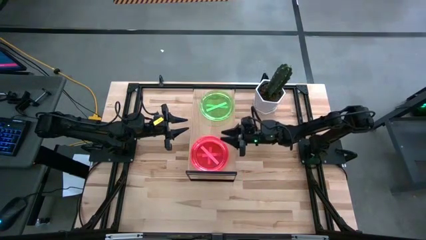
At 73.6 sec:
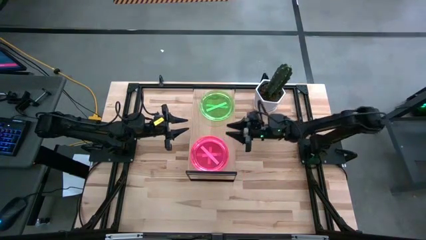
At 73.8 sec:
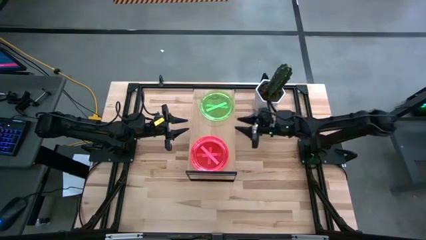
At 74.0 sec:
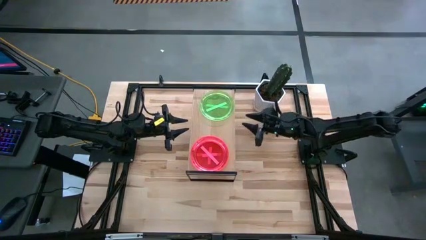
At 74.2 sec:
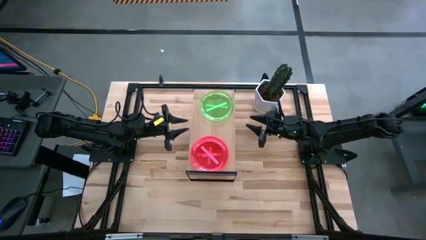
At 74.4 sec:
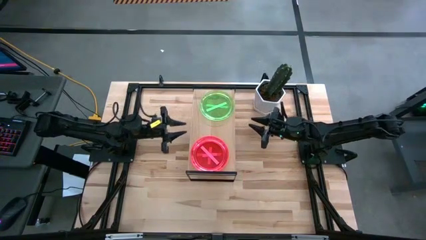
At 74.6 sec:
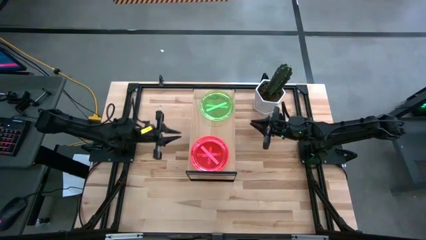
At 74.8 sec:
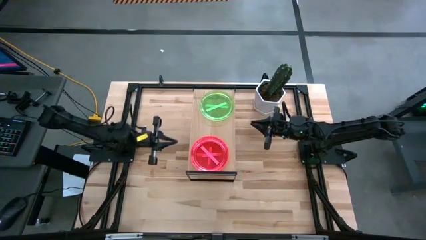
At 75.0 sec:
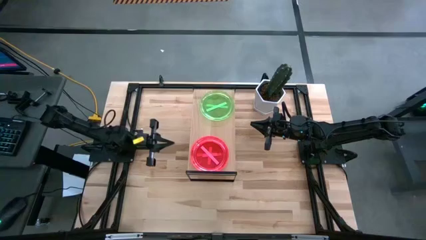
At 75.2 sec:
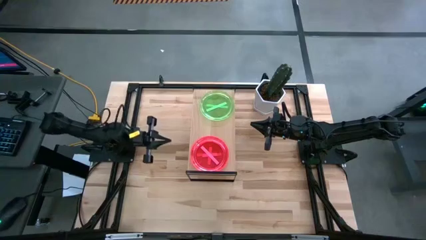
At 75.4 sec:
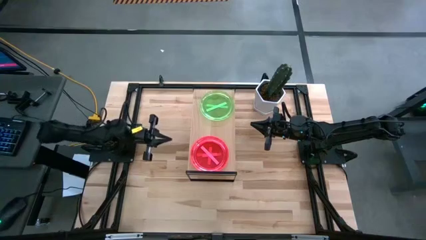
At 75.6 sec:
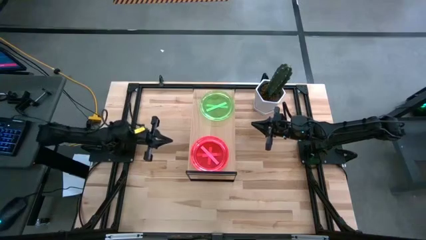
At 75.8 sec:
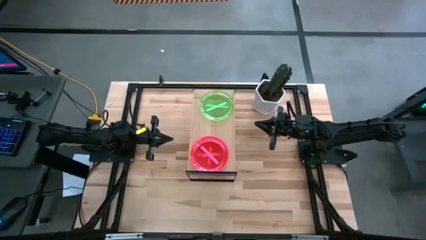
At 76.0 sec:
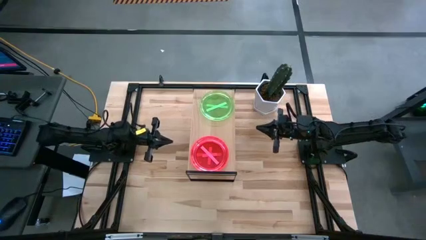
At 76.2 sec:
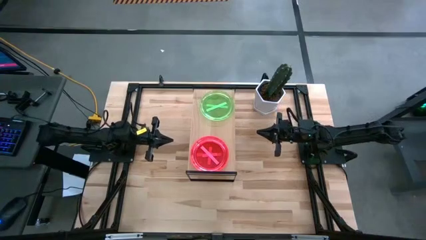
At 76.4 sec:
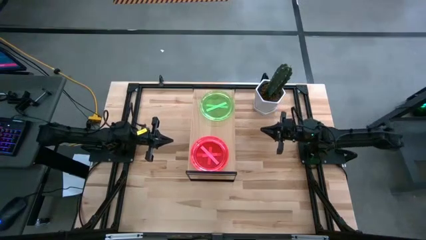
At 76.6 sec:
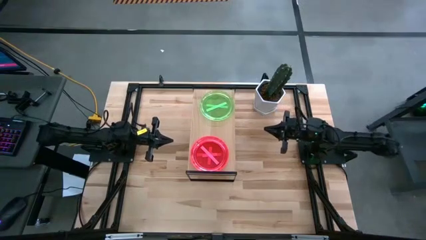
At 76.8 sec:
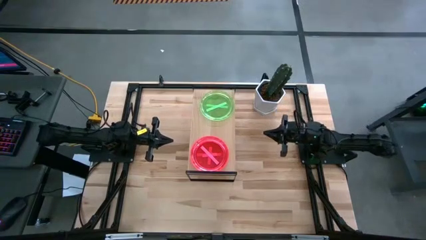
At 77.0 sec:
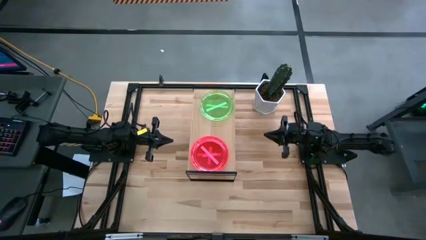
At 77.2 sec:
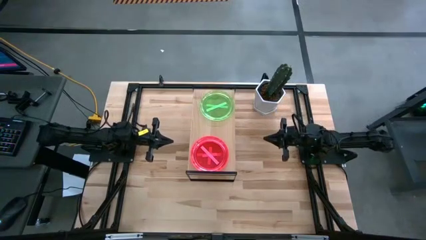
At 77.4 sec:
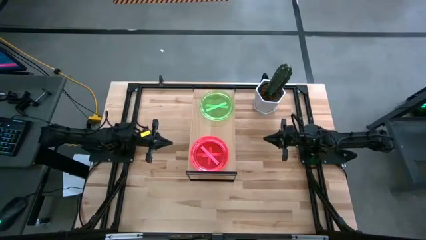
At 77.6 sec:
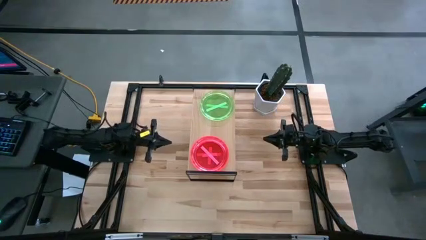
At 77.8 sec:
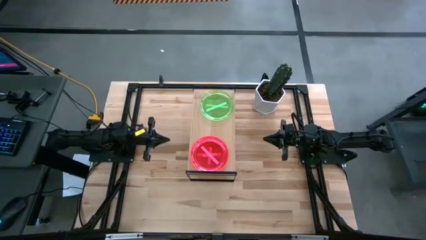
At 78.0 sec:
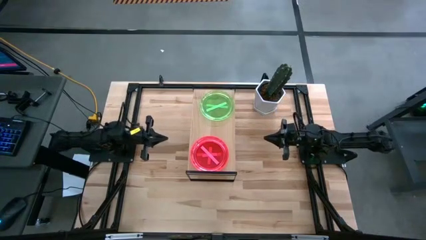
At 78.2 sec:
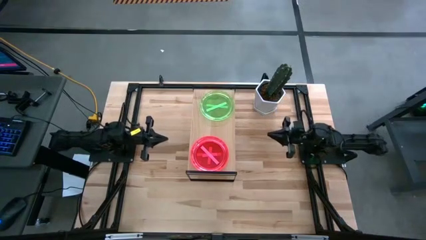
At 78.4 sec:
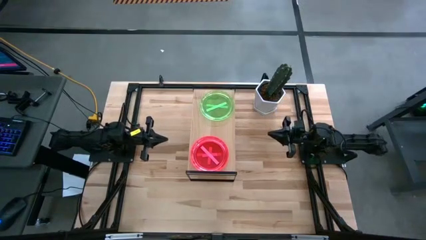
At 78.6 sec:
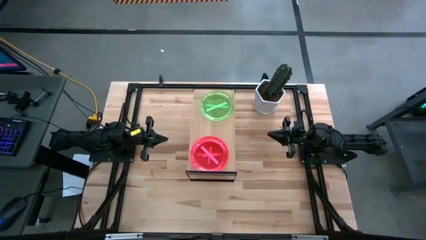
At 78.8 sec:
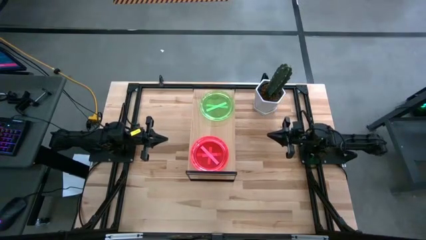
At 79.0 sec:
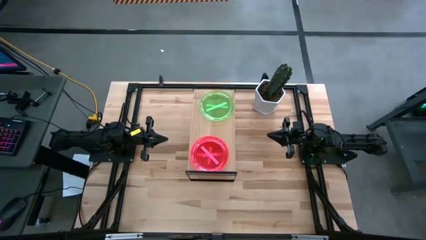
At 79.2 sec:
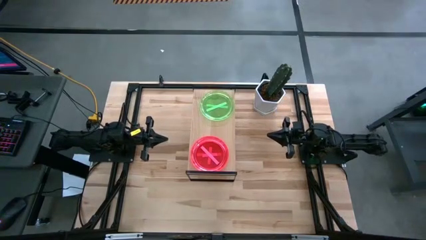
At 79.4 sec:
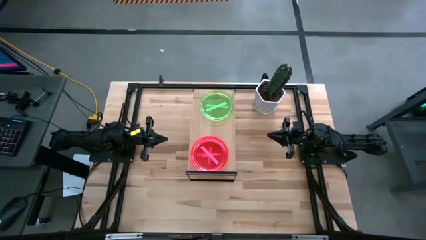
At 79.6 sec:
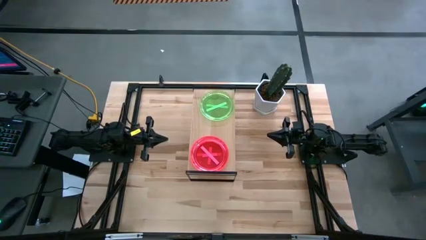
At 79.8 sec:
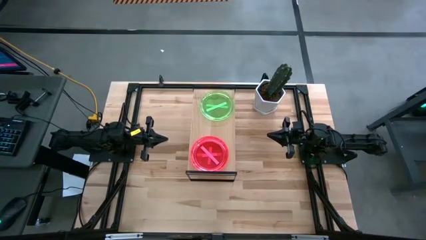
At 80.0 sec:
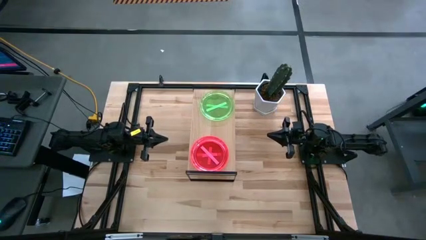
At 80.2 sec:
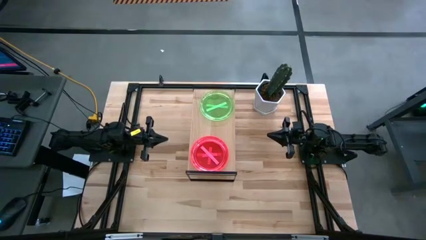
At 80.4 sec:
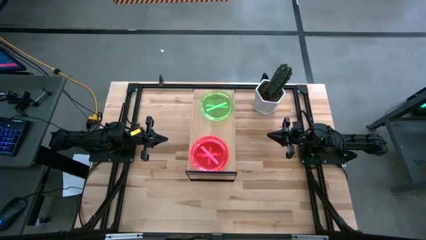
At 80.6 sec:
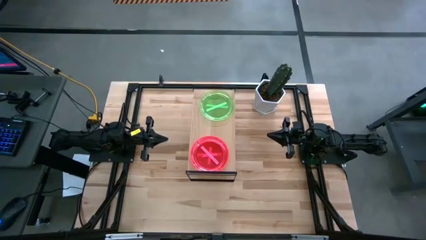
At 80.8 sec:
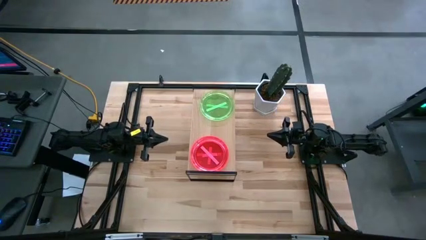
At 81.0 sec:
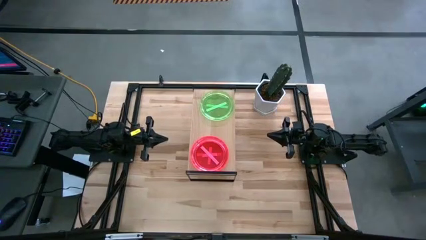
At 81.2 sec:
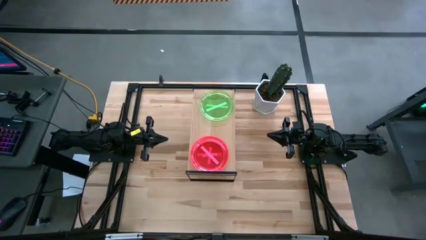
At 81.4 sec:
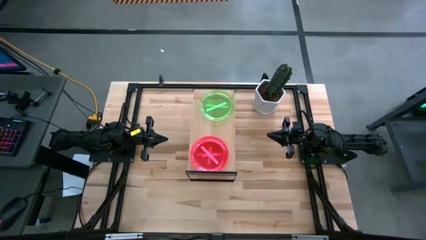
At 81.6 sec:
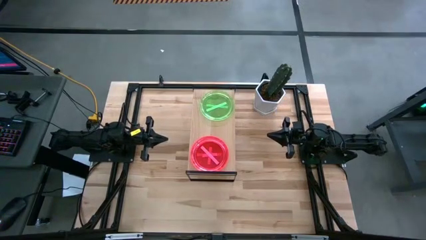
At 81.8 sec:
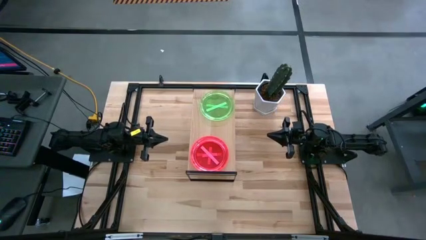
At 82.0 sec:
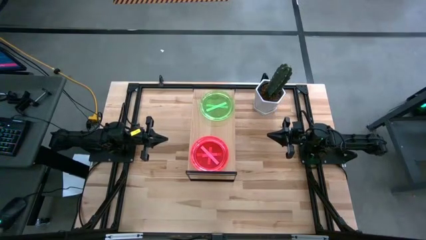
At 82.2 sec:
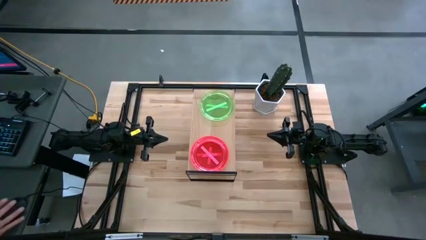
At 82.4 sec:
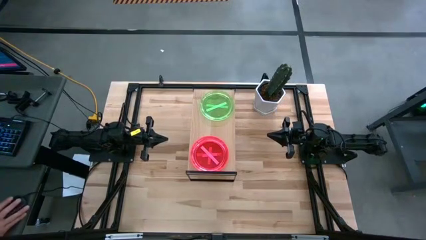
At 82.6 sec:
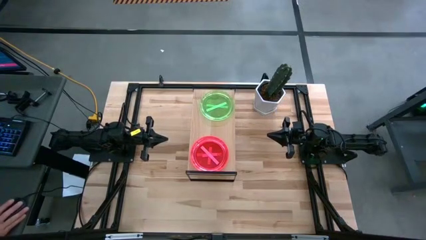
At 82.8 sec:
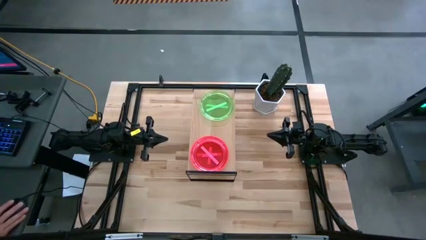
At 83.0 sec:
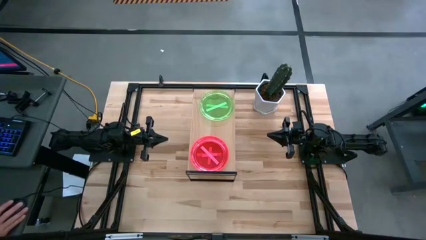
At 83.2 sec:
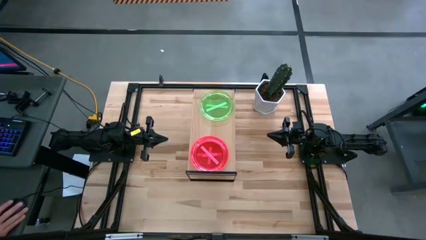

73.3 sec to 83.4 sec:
Task: Place and stack plates onto a shelf
Return to Home Position
